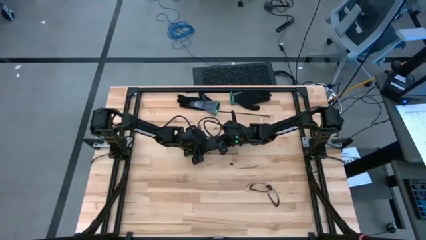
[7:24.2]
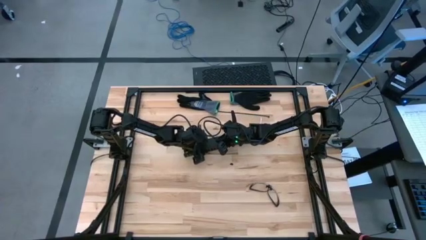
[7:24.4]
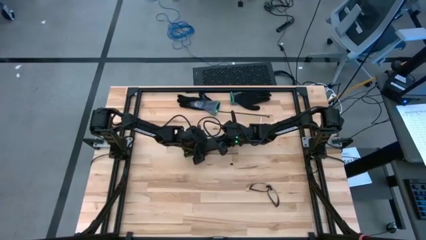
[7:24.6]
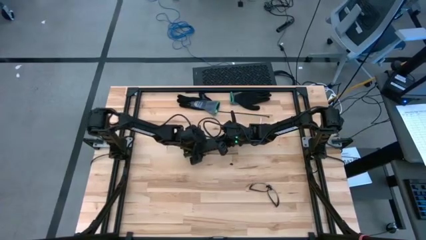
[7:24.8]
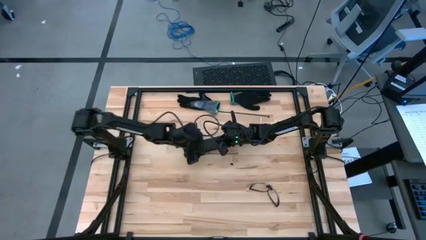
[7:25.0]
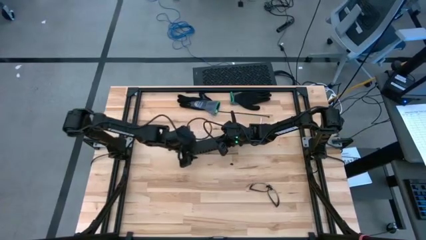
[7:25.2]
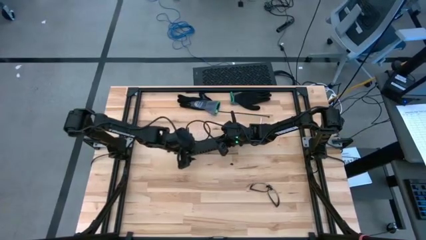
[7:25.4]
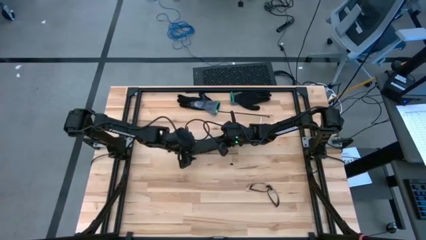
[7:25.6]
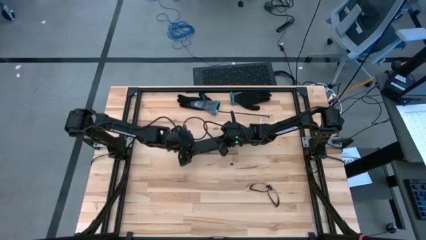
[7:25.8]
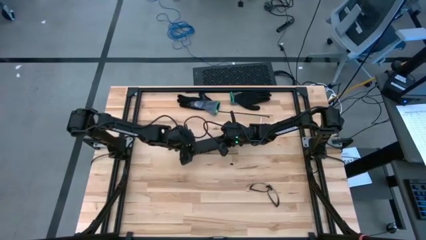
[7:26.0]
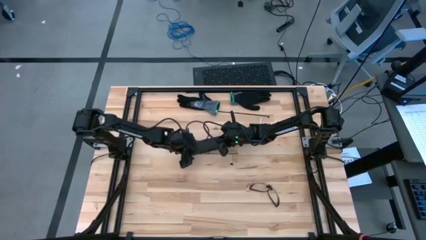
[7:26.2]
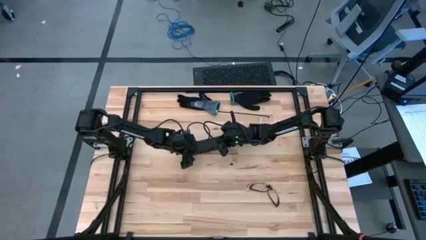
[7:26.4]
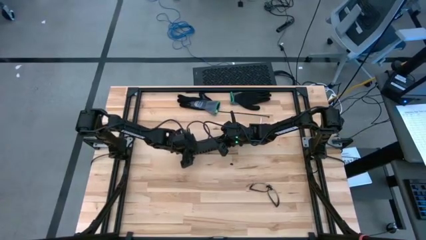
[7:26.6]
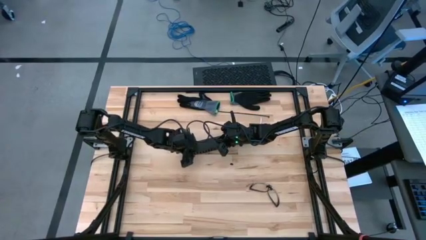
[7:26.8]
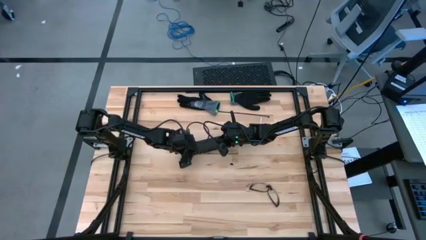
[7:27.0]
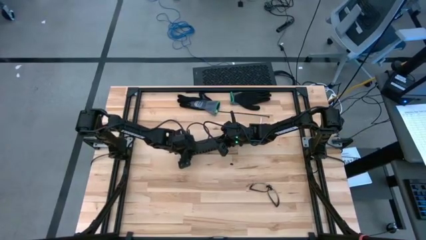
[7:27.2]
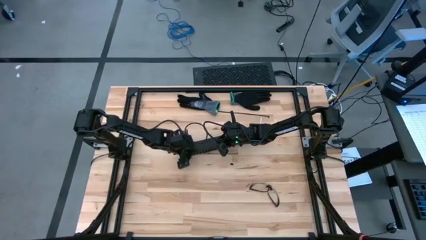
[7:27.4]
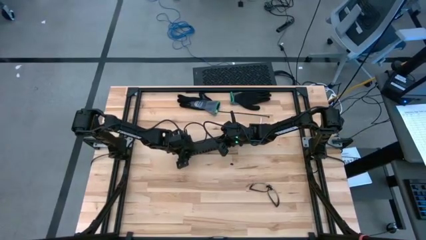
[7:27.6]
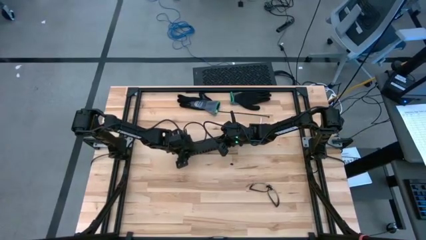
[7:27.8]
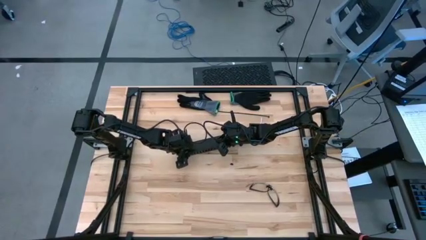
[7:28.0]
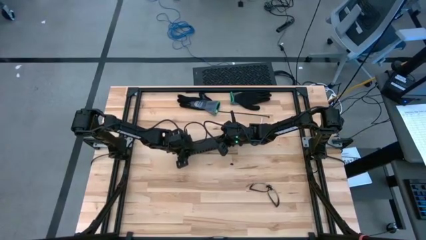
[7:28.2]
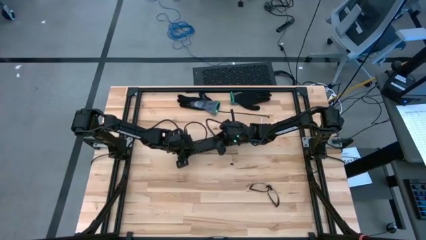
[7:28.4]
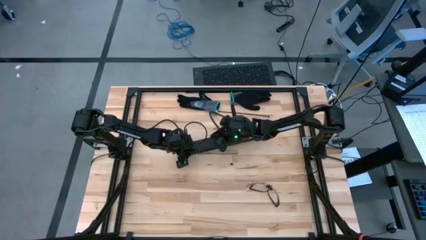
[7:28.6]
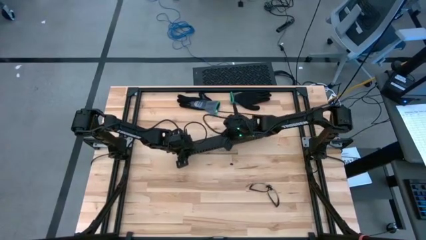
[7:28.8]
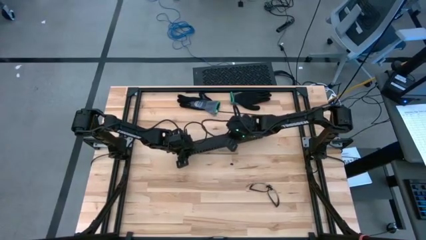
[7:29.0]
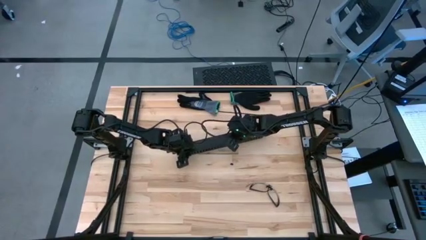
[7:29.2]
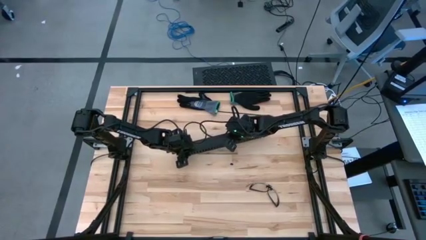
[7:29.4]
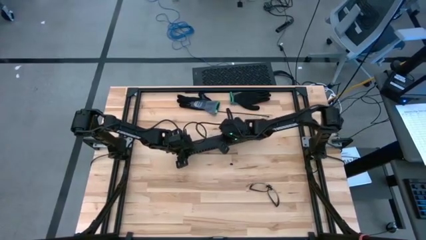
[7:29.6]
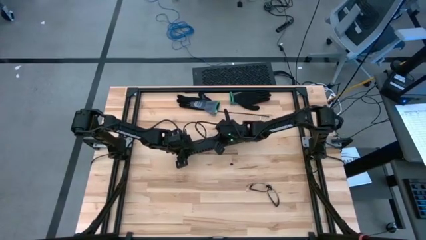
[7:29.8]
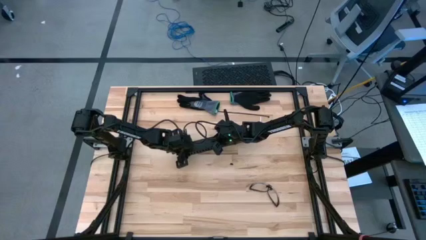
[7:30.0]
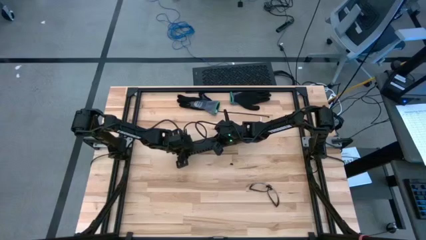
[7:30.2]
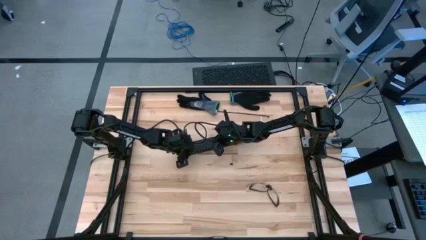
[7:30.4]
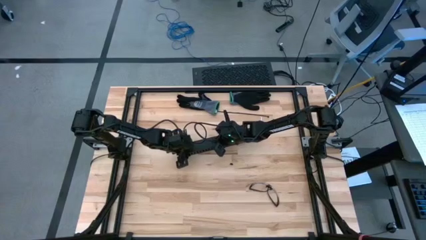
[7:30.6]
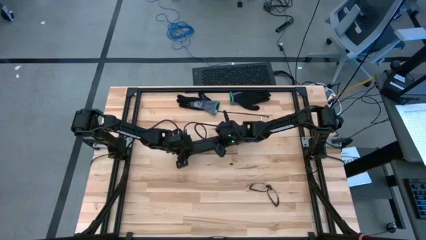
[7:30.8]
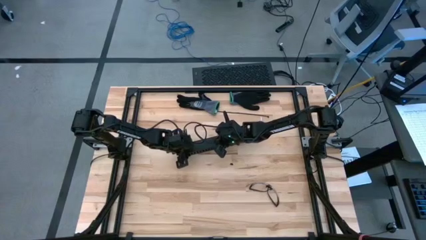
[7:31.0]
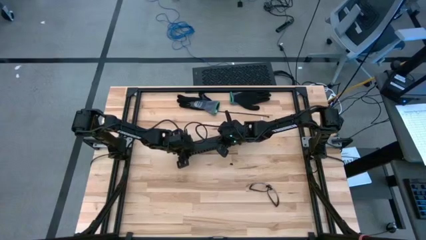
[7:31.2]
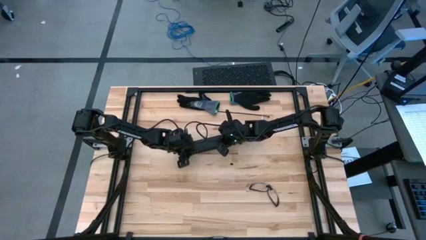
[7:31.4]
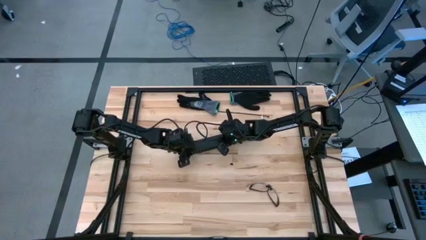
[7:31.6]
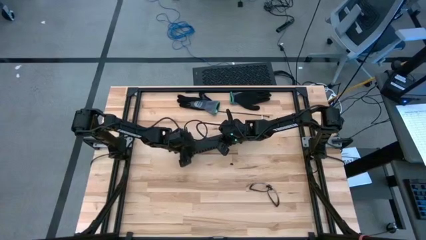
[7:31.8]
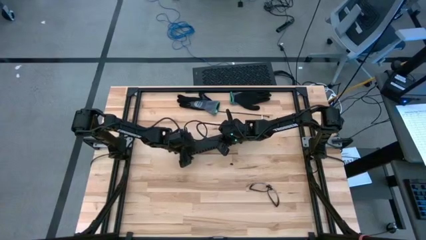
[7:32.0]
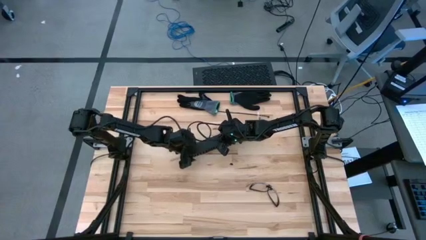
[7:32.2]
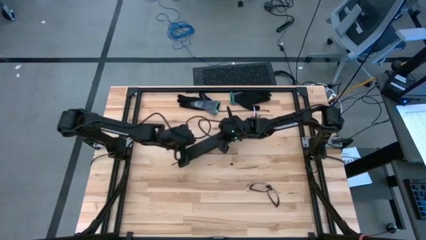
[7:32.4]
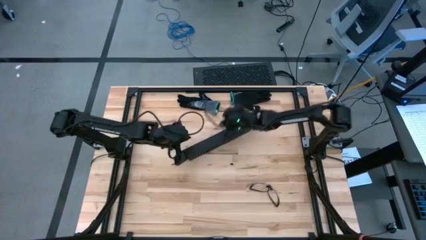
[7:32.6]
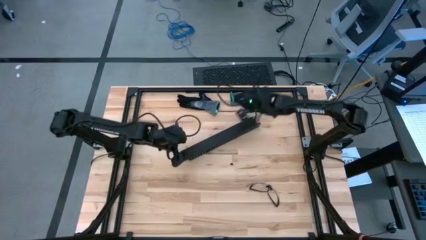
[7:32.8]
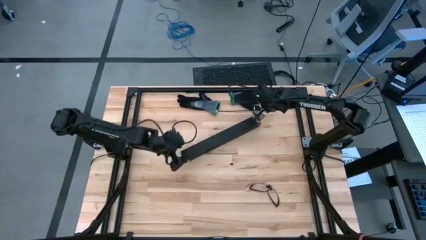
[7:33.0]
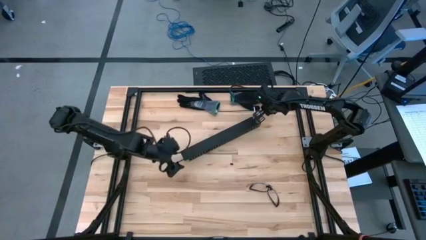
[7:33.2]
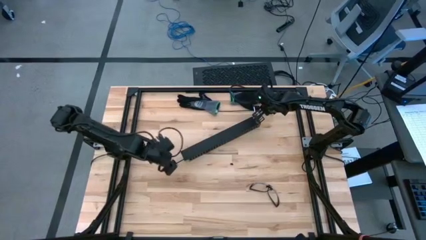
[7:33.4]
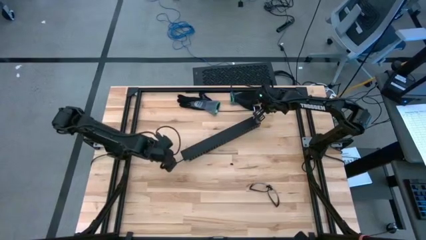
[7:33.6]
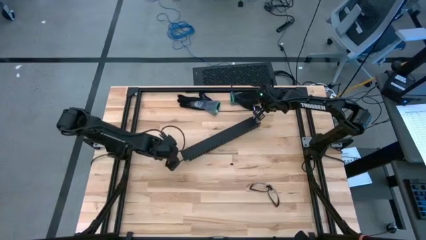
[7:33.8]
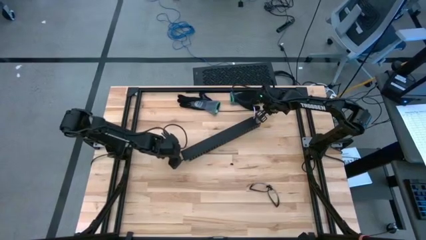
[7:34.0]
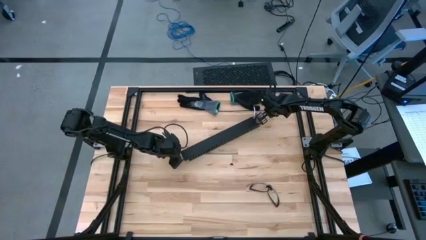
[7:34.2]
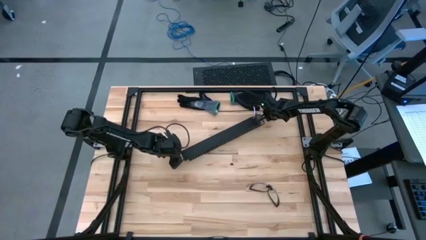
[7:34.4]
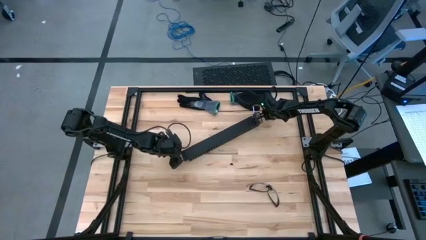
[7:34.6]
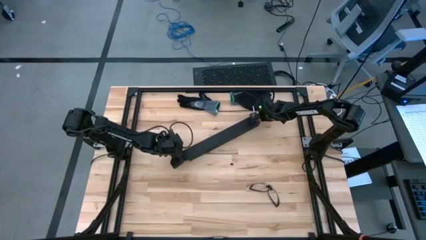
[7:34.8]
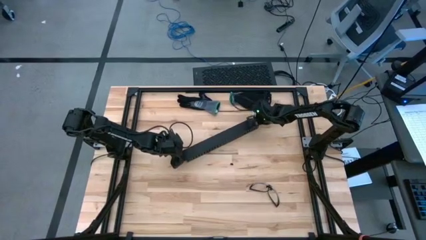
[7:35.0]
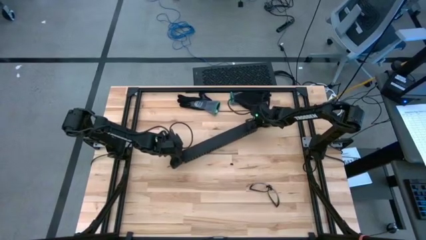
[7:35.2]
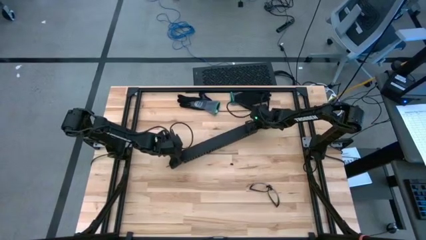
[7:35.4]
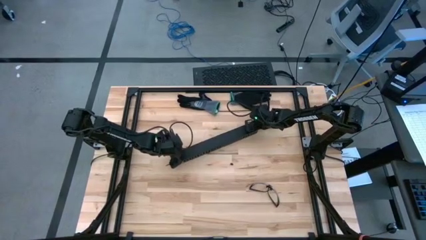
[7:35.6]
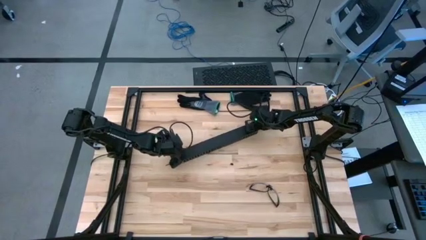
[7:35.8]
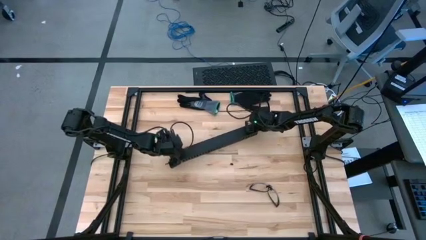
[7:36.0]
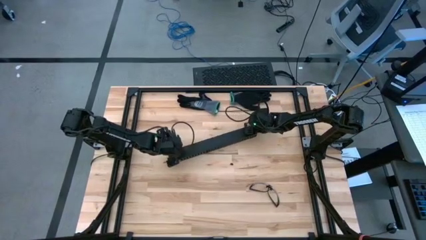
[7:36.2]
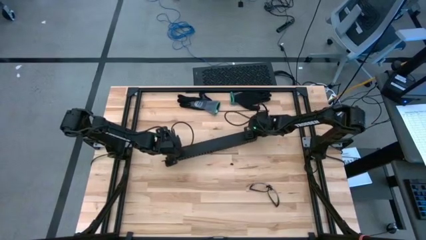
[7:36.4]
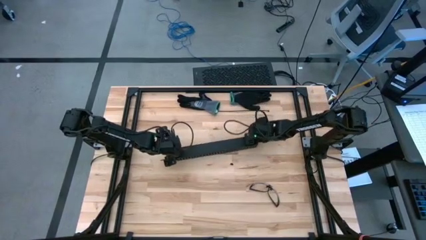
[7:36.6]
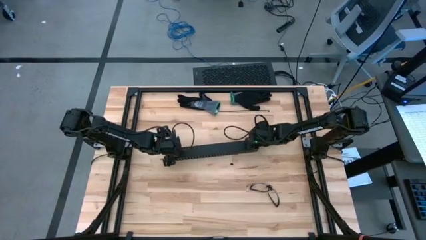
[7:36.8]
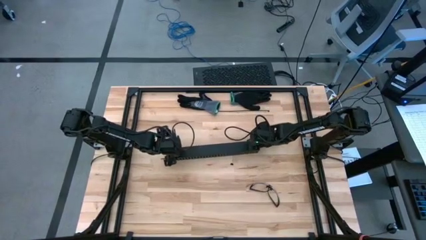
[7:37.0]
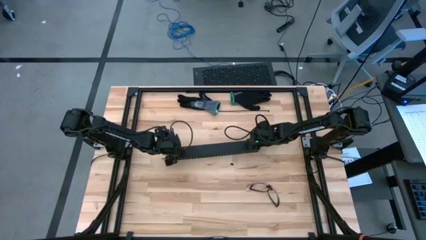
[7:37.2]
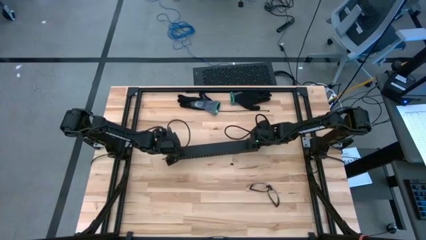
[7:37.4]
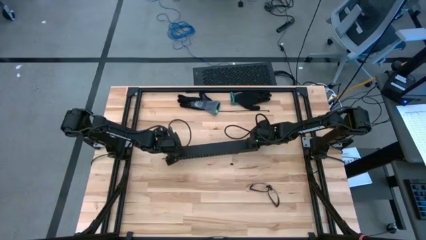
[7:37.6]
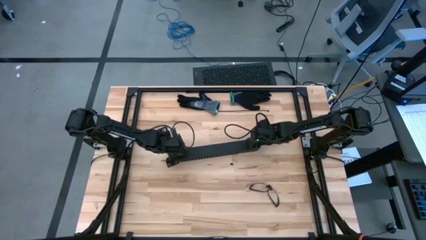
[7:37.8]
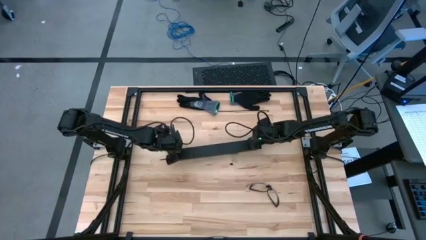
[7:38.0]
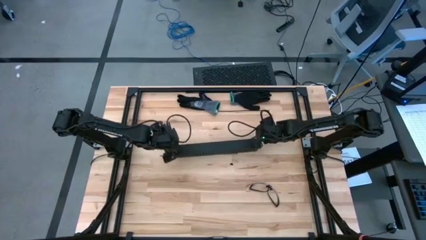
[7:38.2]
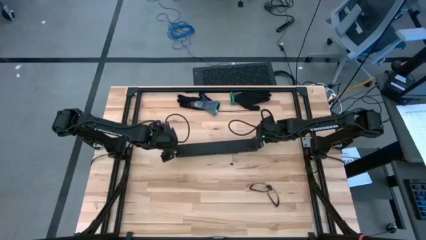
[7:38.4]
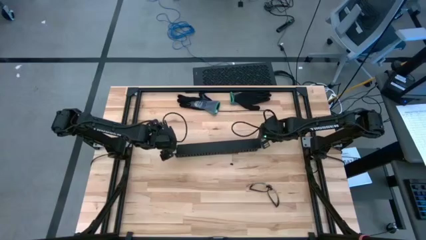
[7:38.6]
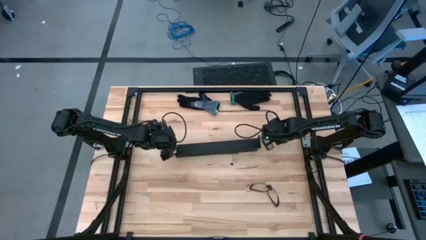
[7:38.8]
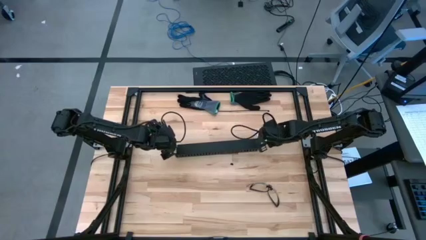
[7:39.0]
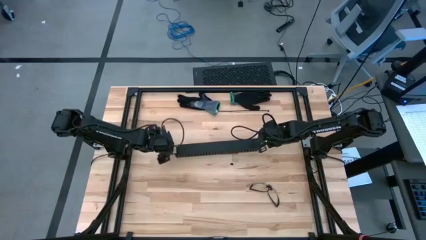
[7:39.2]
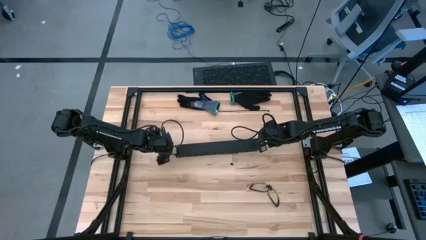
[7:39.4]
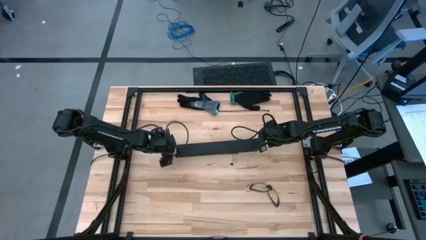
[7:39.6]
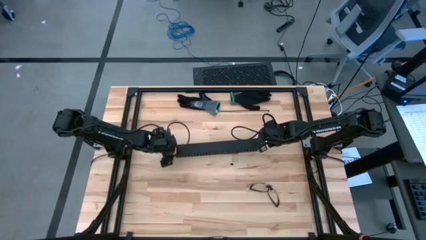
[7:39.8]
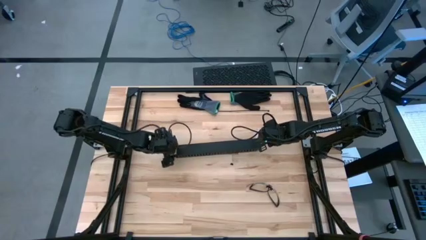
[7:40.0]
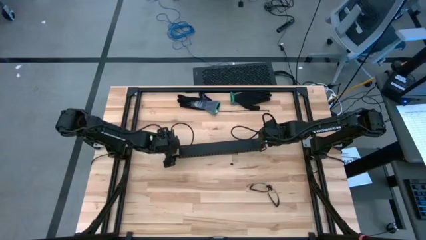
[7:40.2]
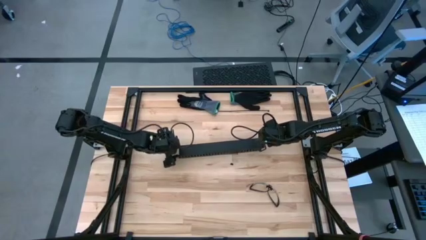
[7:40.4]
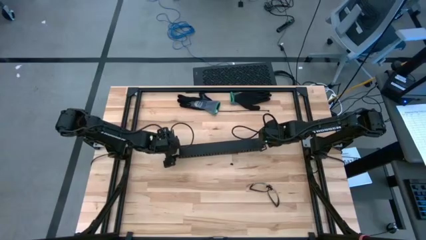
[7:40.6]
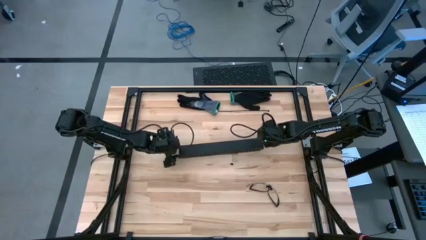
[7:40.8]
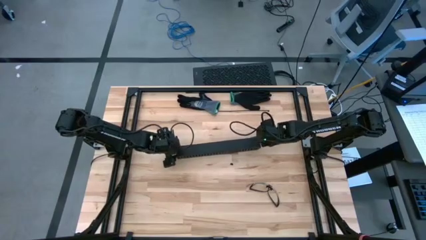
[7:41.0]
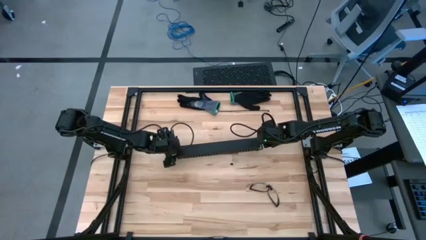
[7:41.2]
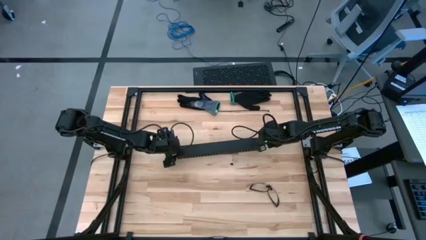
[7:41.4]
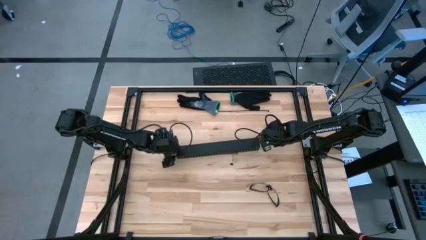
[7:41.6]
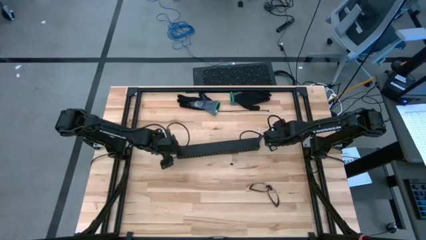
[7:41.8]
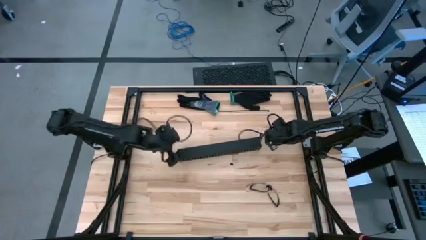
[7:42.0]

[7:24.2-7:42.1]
Task: Ziptie cables
Close the black cable duct
